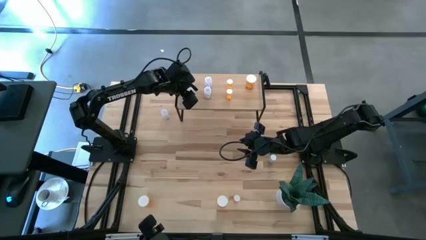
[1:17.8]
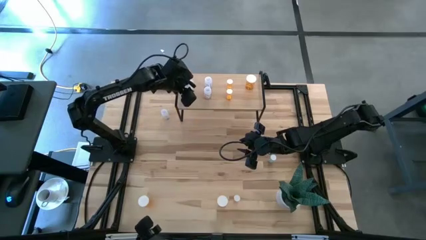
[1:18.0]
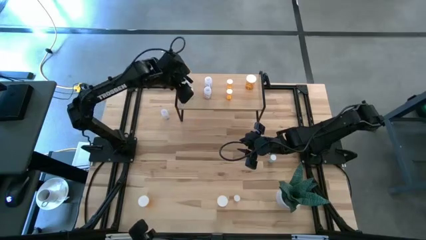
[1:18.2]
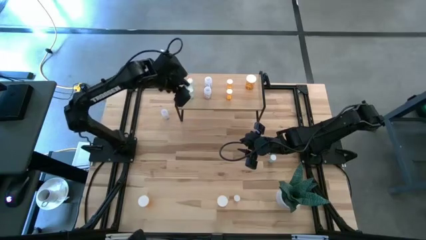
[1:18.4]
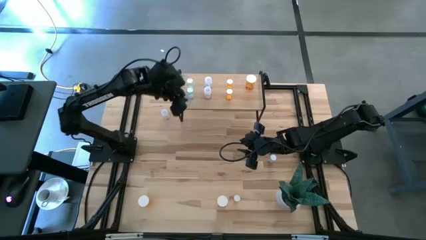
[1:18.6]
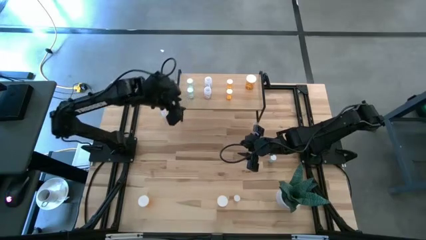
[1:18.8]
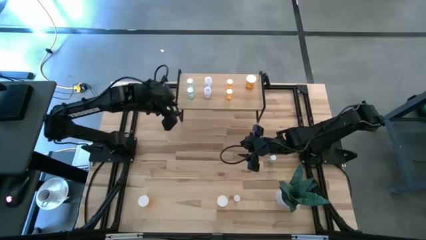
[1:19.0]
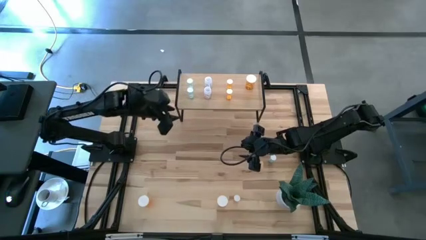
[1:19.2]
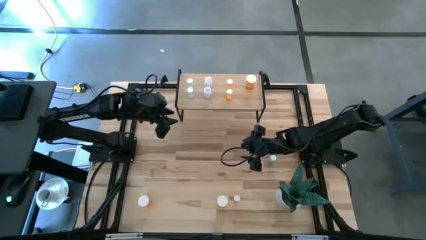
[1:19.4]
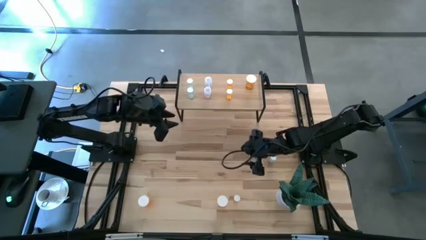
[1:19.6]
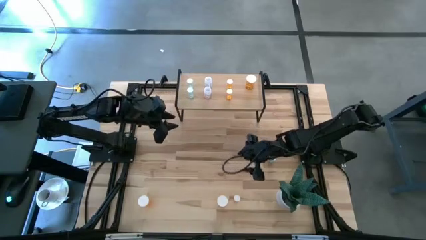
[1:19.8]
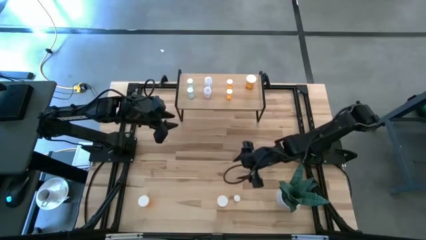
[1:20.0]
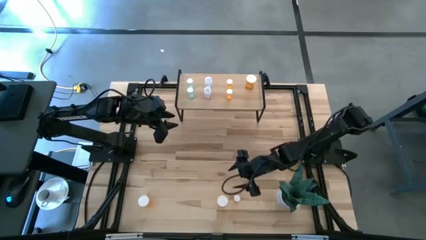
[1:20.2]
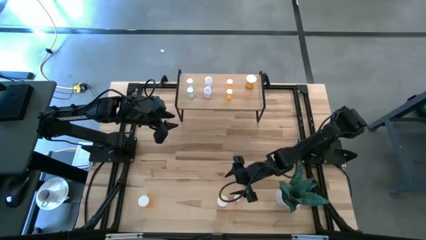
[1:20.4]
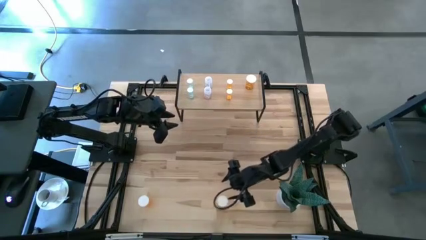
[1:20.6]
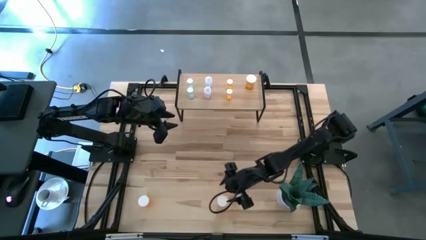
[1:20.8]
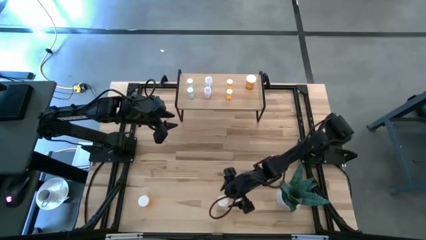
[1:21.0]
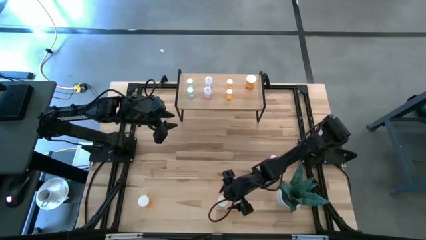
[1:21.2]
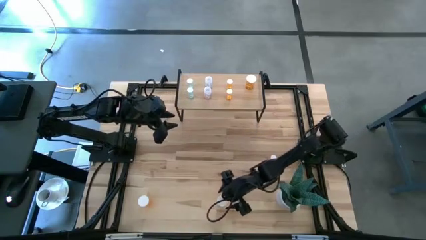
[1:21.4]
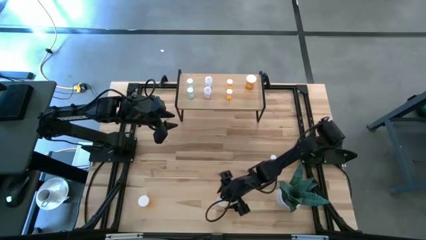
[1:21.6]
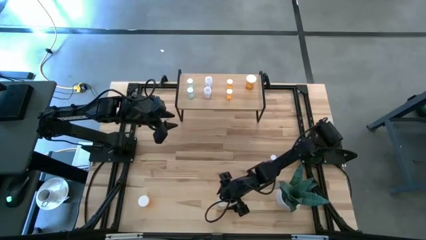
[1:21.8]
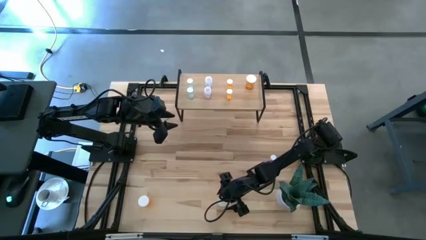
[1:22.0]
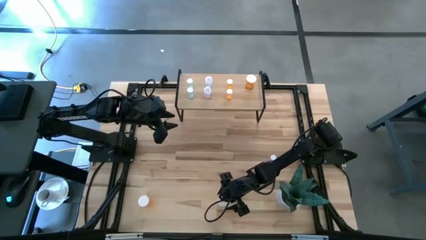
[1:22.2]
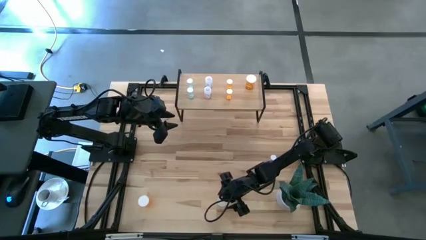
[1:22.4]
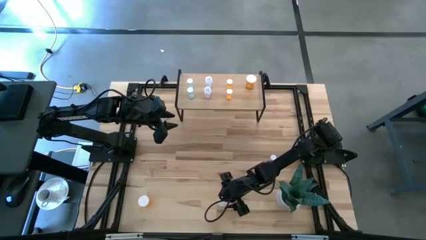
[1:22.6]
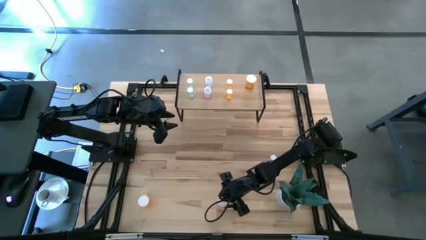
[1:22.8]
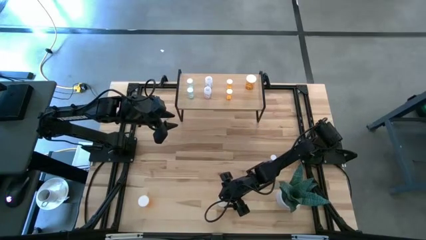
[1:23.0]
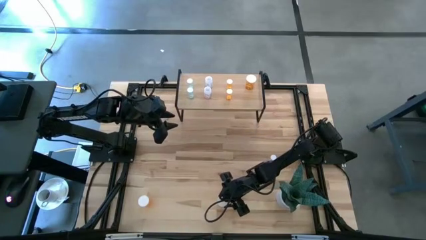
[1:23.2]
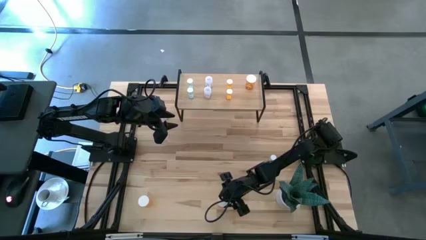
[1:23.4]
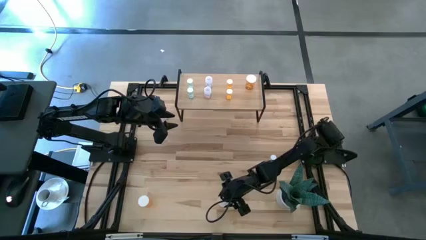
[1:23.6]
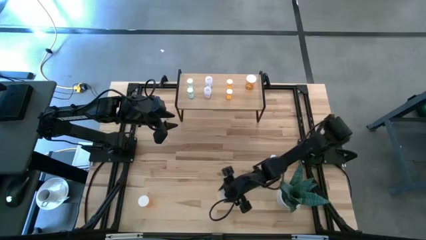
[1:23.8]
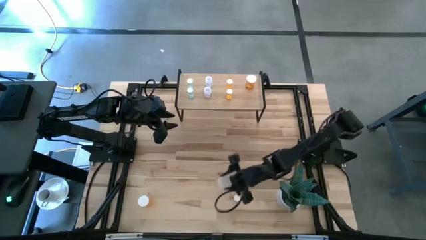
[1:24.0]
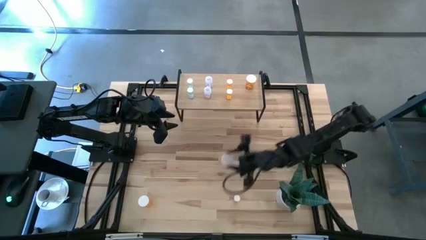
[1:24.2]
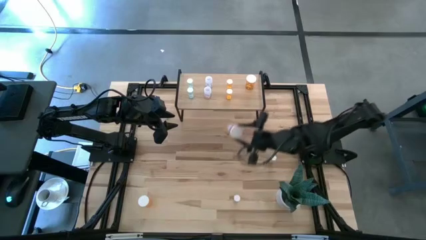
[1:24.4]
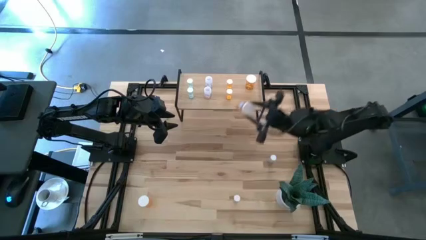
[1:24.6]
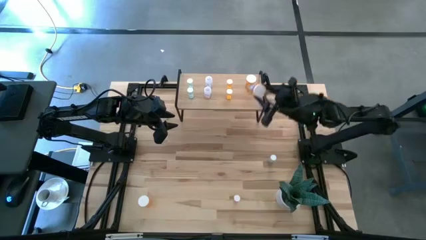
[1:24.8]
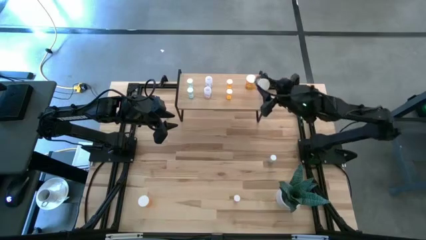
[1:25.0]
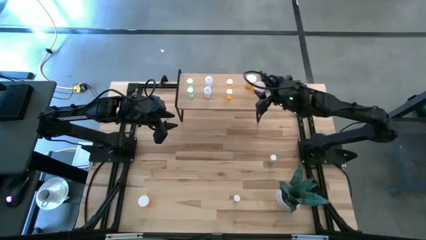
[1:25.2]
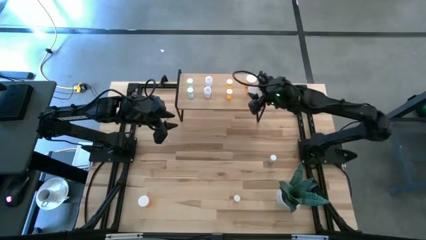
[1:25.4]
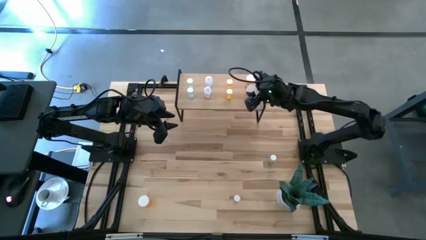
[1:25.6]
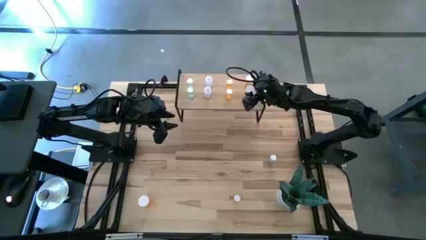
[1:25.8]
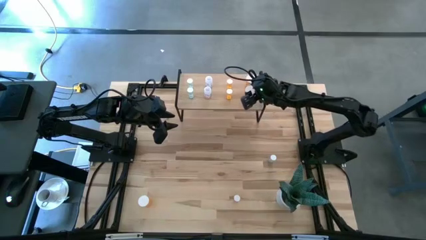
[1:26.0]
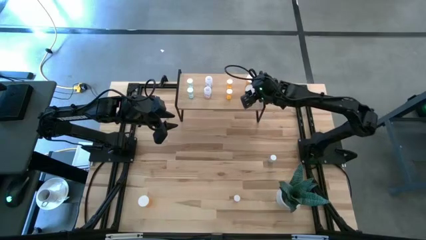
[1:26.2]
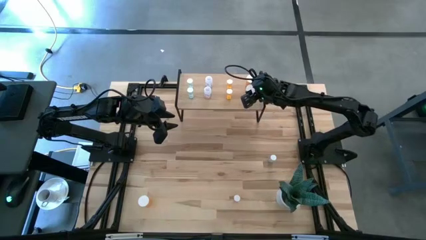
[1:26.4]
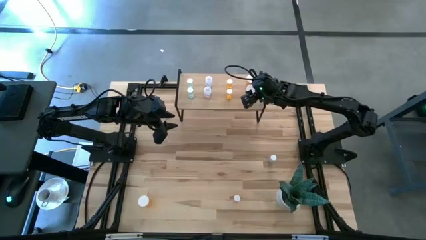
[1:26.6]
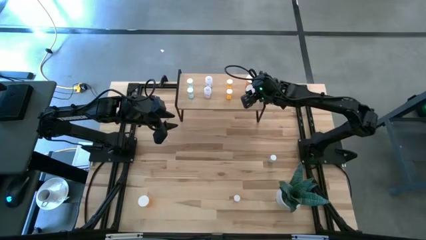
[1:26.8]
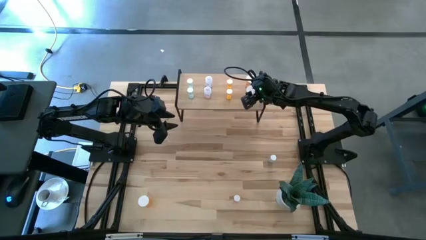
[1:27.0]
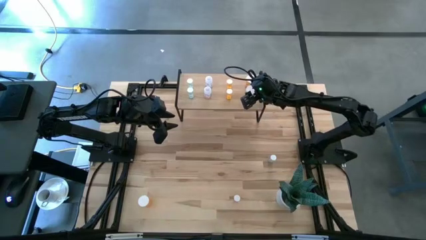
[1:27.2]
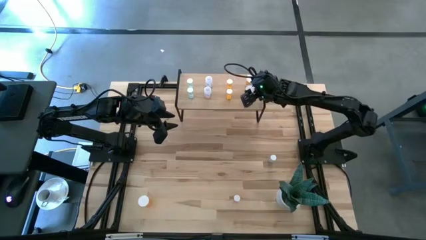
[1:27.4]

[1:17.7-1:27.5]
Task: Pick and place medicine bottles onto shelf by color
Put the right large orange pill bottle on the shelf aligned with the other large orange pill bottle

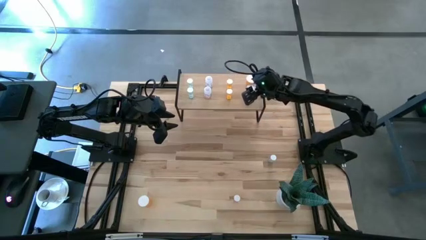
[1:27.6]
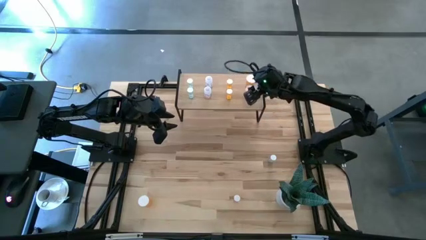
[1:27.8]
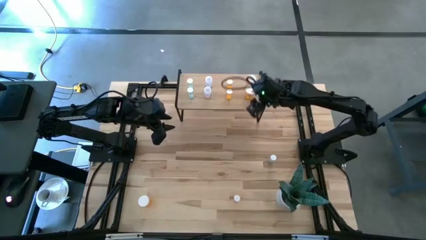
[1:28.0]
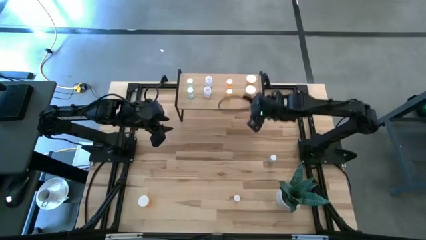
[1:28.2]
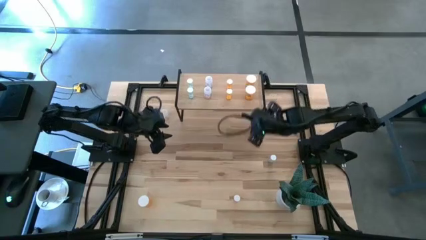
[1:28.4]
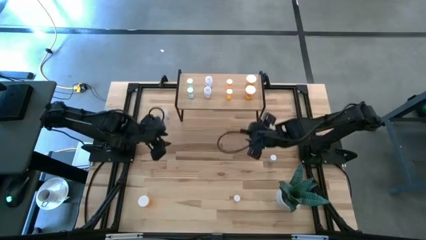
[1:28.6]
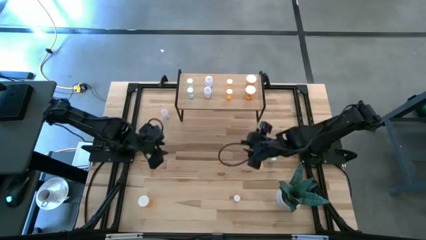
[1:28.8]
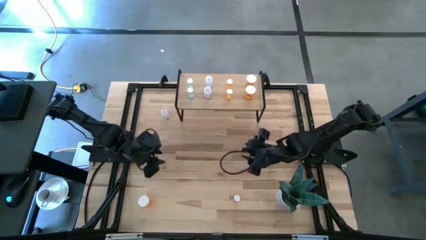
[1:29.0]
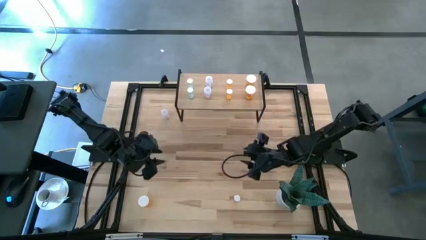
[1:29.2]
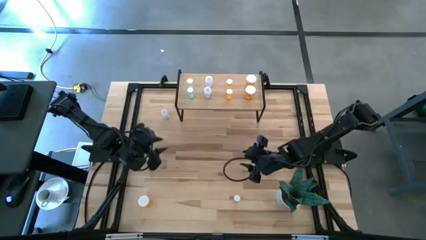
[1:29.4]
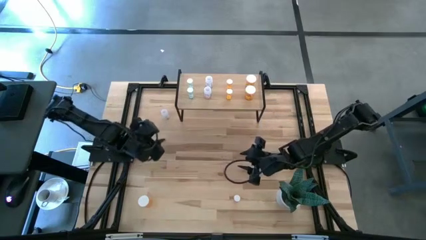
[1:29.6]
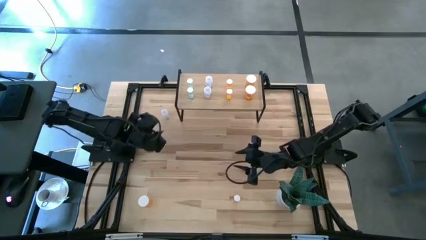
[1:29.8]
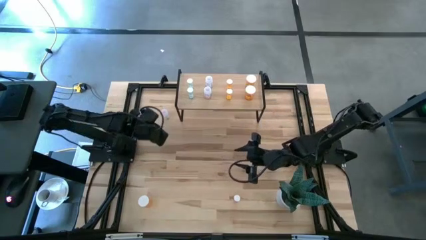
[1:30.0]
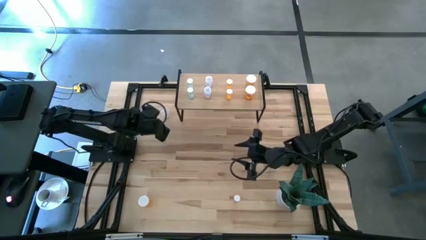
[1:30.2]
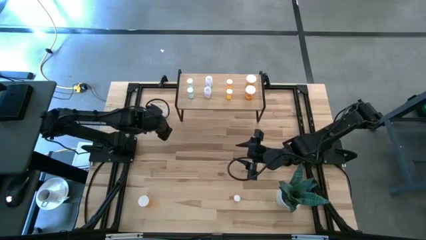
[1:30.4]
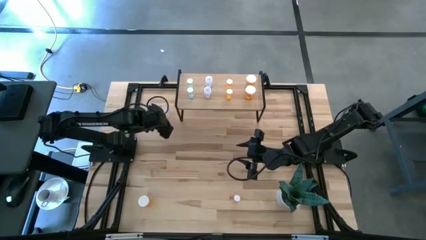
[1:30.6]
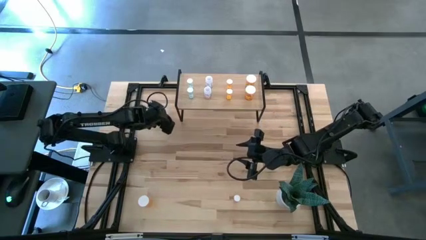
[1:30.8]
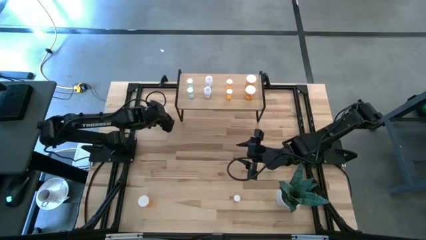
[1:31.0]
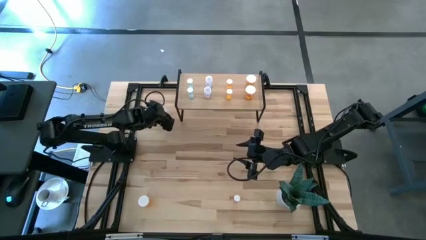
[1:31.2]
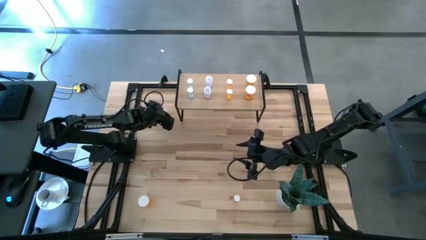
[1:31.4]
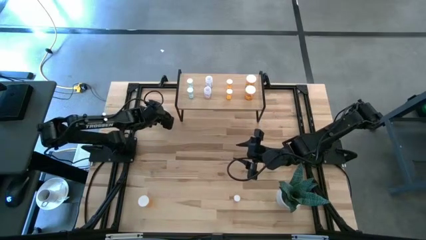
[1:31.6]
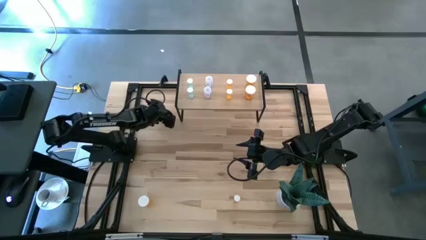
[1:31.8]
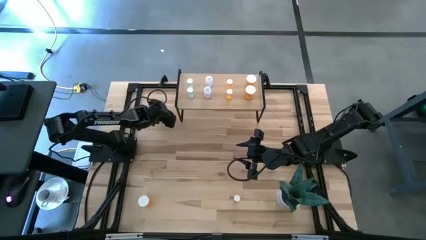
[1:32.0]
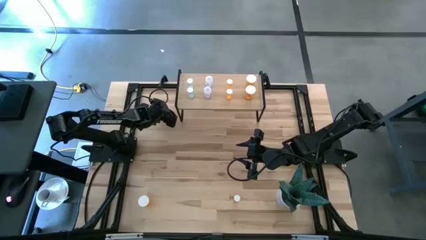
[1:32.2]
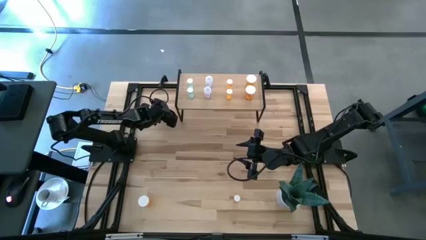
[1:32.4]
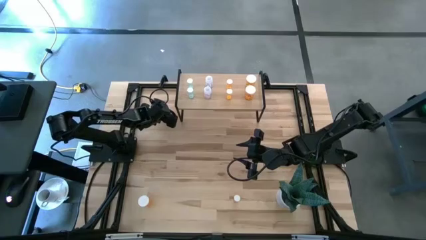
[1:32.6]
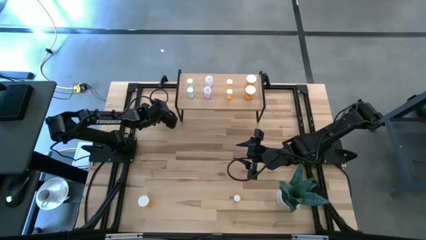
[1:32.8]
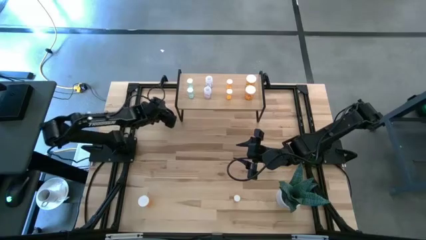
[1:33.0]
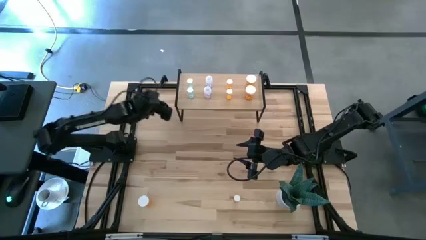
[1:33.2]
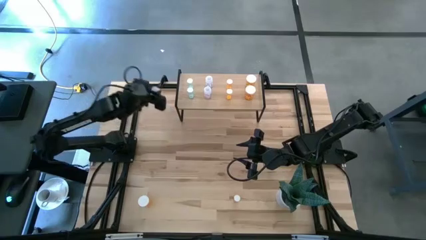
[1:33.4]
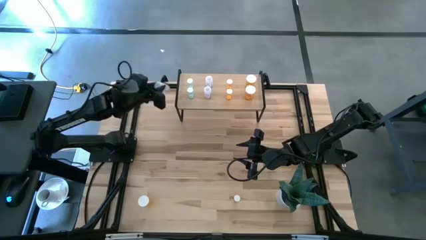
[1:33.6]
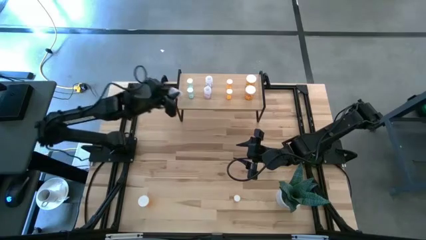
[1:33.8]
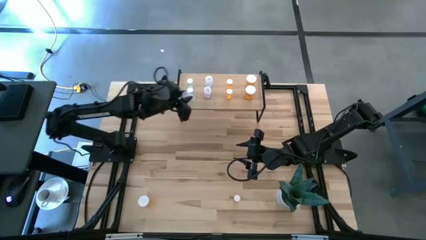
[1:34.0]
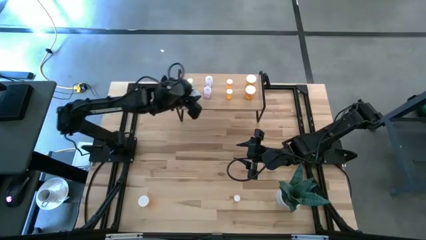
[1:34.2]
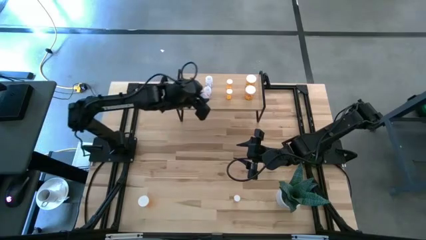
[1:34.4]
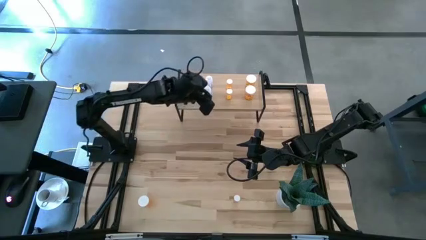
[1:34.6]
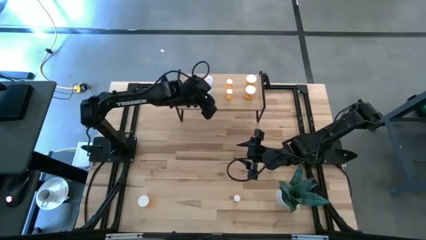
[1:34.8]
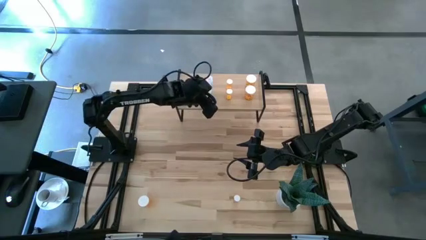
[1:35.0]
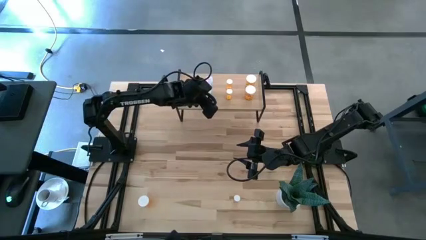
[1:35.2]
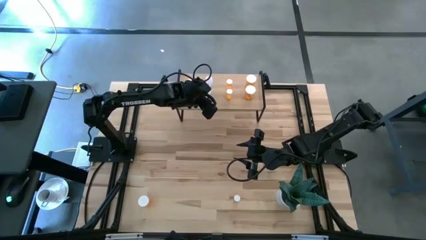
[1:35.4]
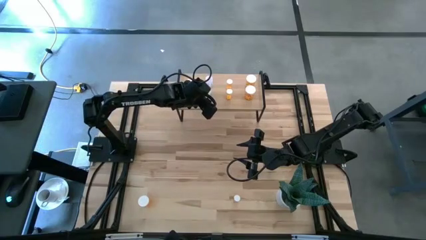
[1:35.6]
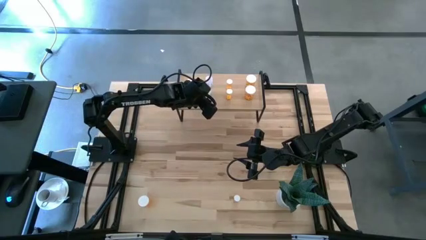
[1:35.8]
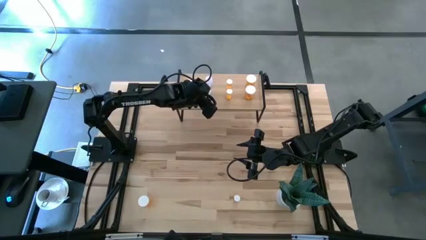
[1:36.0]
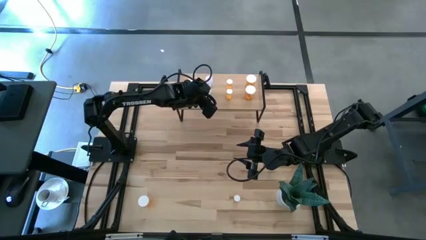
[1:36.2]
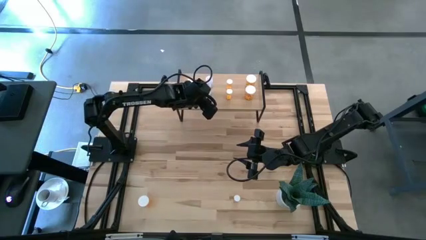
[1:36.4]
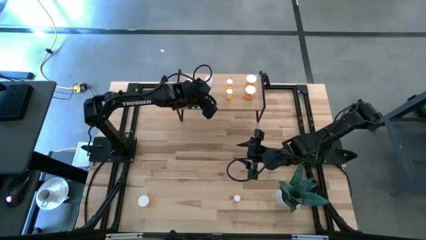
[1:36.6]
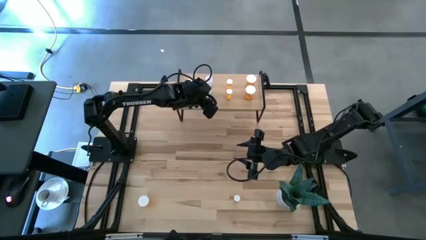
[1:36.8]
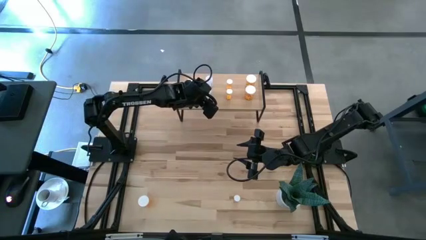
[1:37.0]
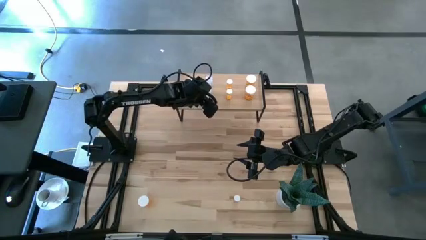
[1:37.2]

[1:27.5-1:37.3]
Put the transparent pill bottle on the shelf aligned with the other transparent pill bottles
